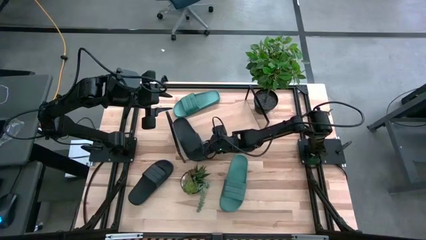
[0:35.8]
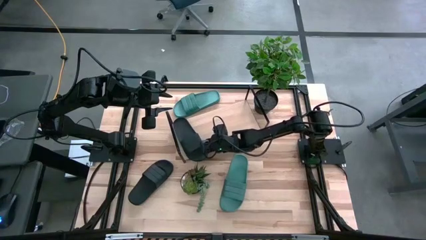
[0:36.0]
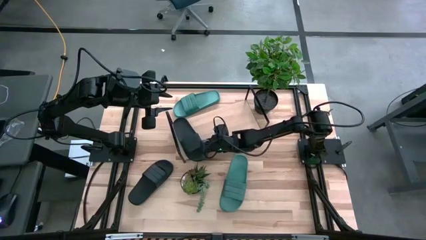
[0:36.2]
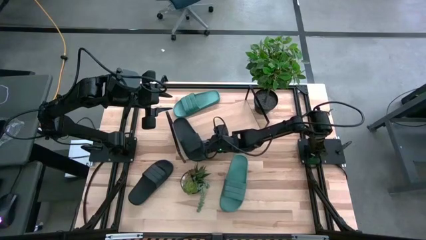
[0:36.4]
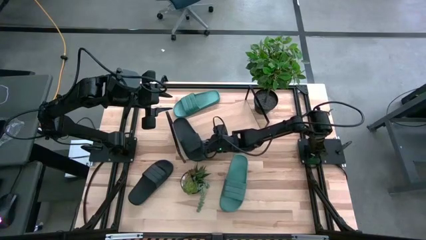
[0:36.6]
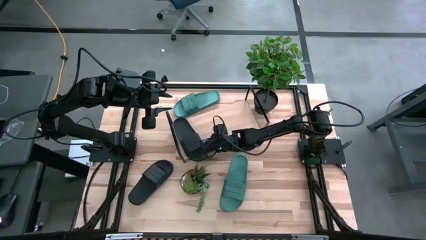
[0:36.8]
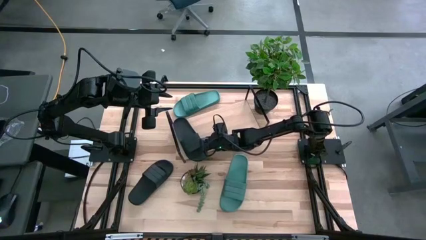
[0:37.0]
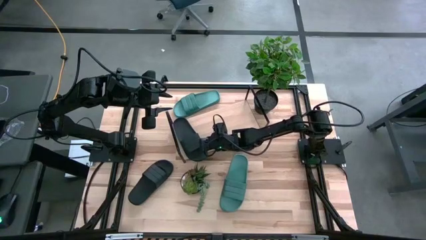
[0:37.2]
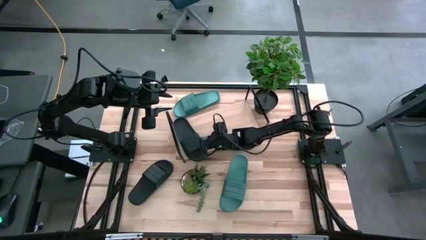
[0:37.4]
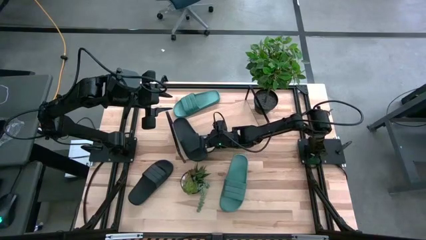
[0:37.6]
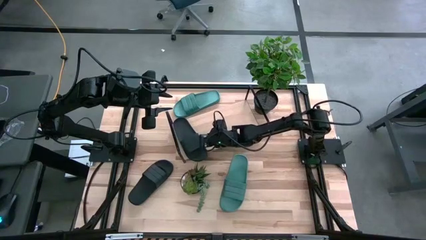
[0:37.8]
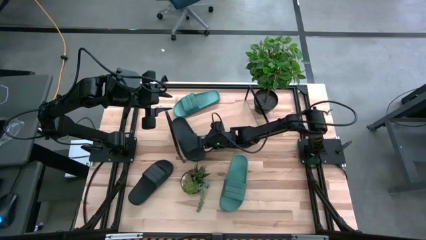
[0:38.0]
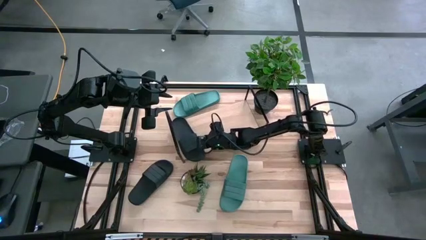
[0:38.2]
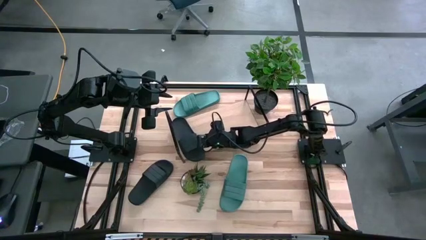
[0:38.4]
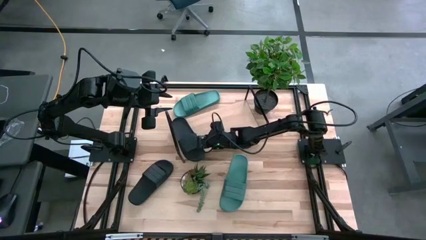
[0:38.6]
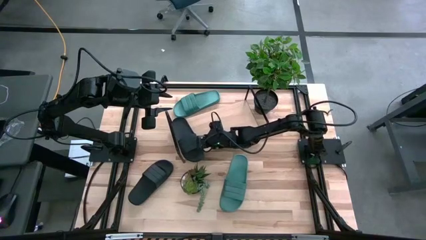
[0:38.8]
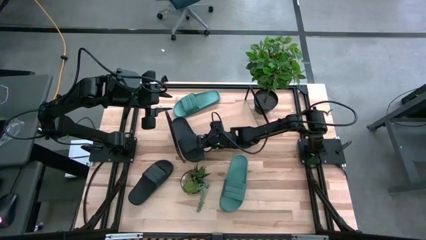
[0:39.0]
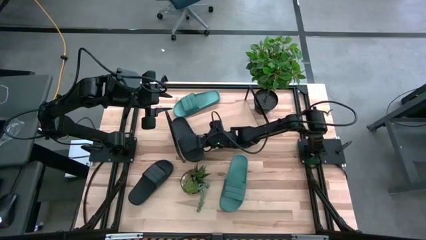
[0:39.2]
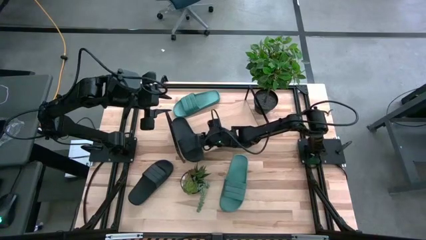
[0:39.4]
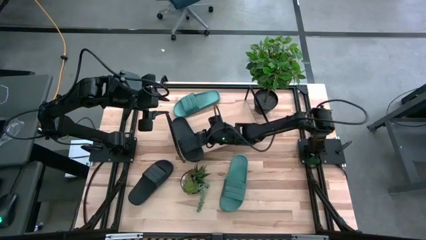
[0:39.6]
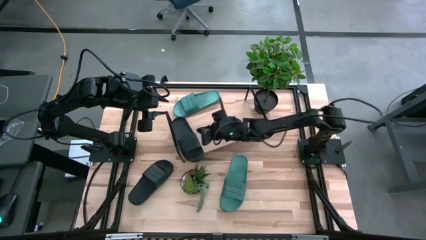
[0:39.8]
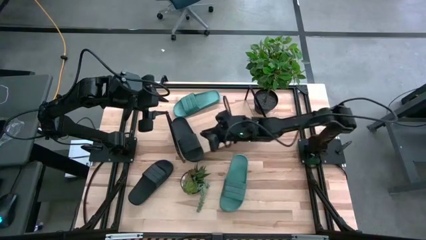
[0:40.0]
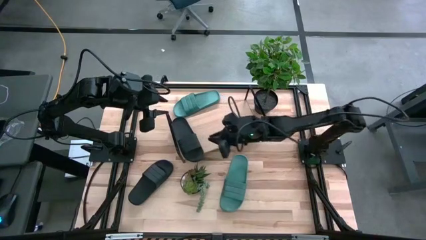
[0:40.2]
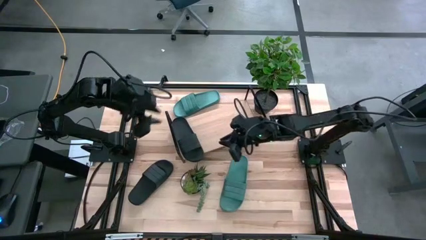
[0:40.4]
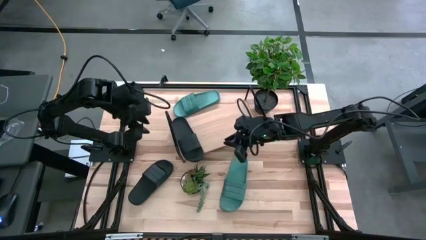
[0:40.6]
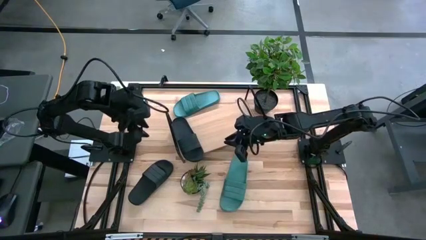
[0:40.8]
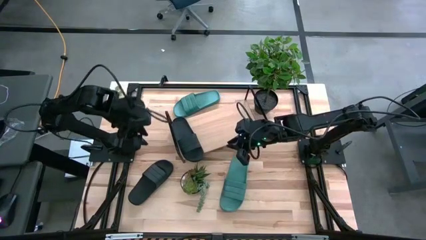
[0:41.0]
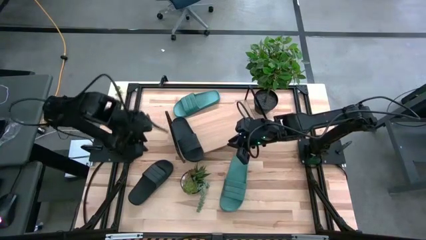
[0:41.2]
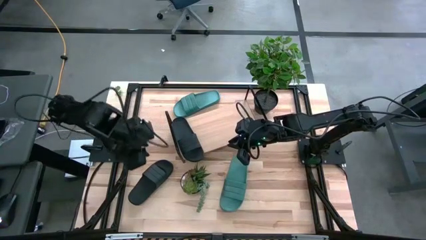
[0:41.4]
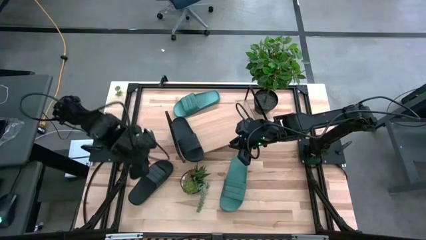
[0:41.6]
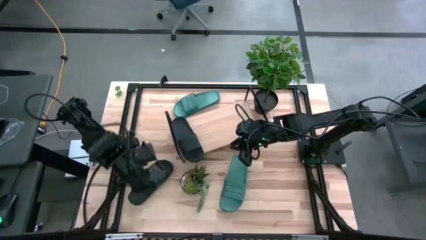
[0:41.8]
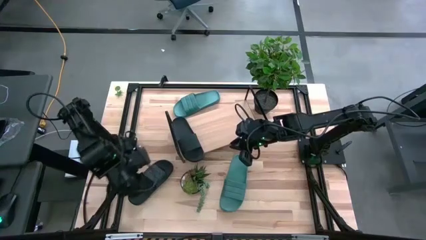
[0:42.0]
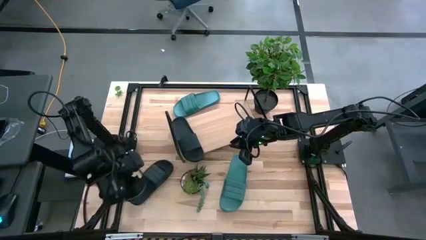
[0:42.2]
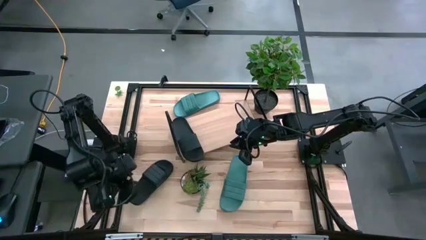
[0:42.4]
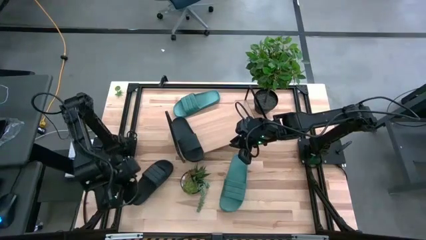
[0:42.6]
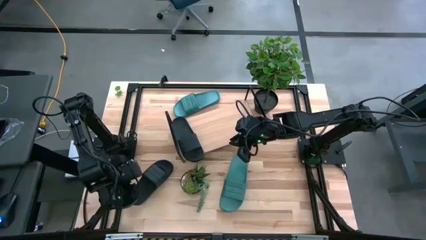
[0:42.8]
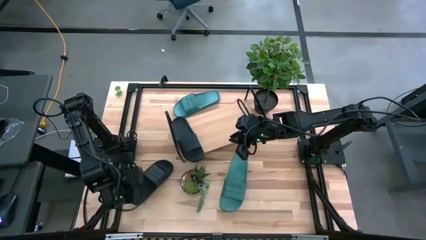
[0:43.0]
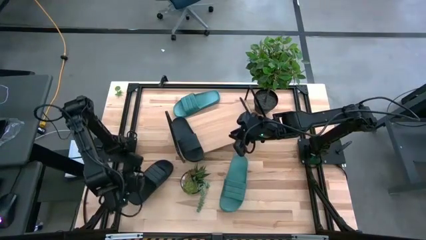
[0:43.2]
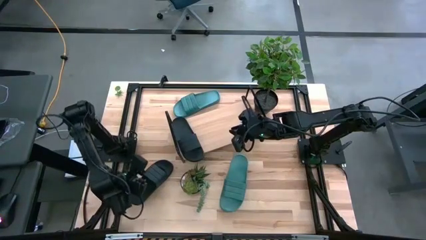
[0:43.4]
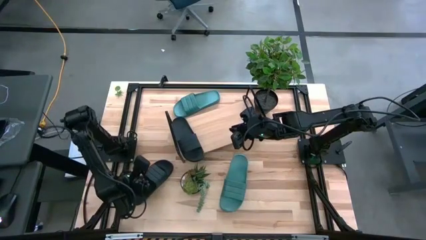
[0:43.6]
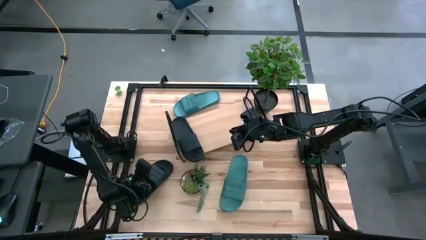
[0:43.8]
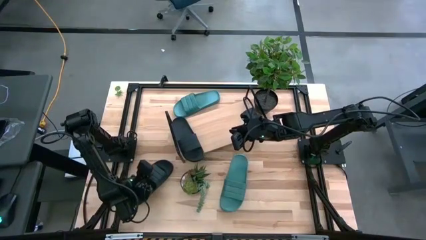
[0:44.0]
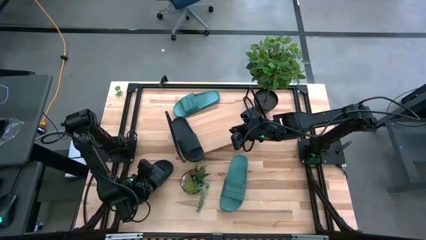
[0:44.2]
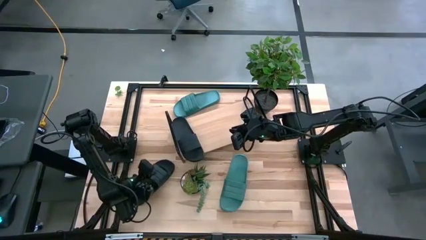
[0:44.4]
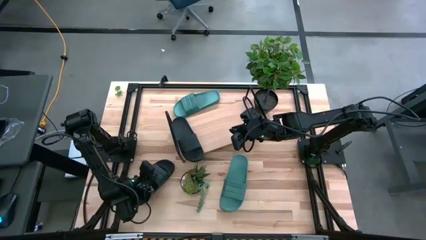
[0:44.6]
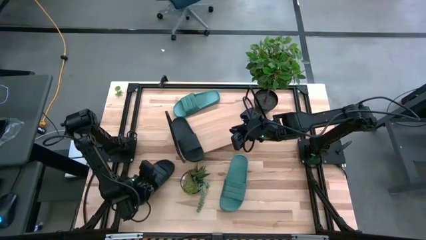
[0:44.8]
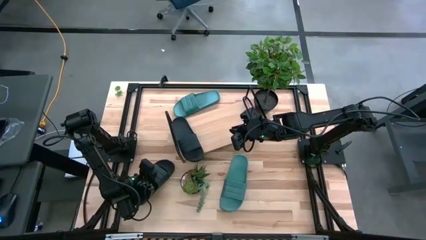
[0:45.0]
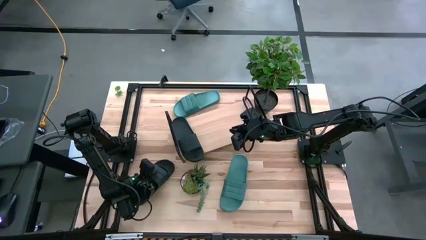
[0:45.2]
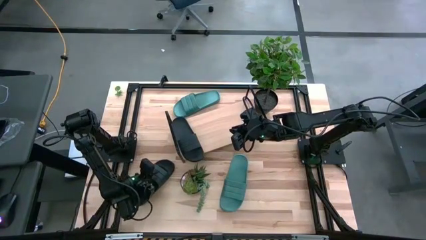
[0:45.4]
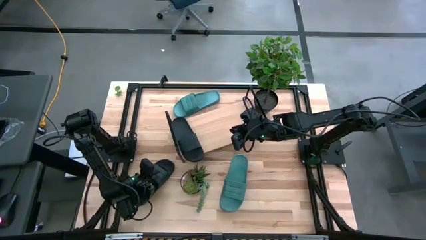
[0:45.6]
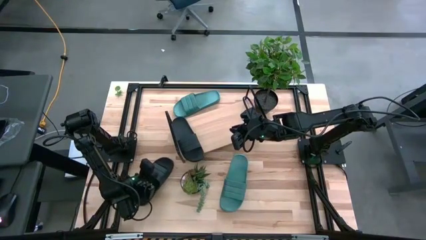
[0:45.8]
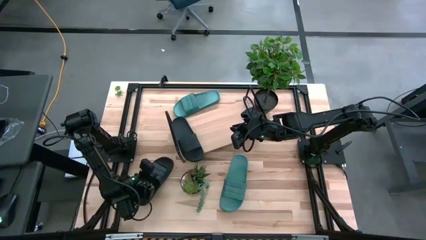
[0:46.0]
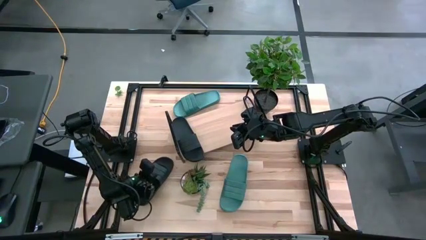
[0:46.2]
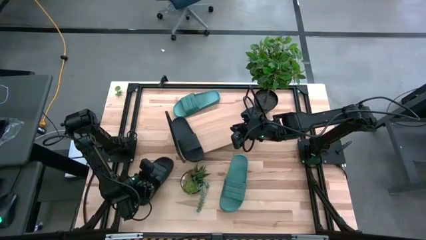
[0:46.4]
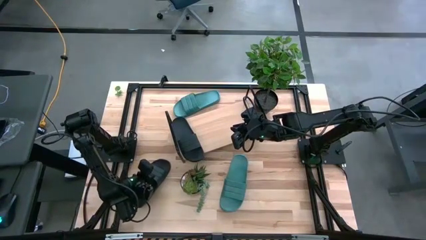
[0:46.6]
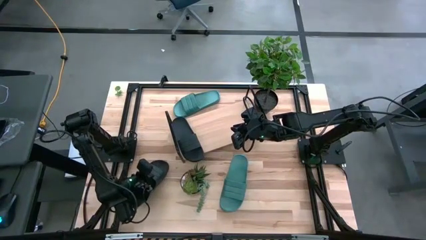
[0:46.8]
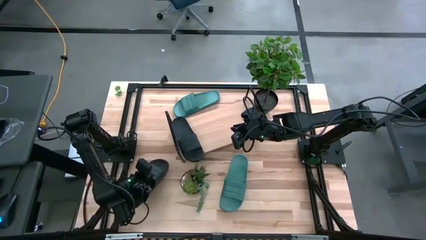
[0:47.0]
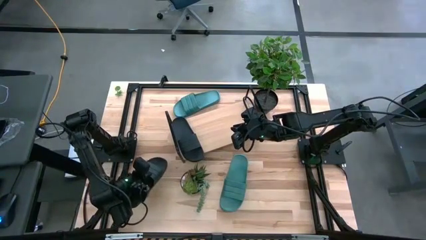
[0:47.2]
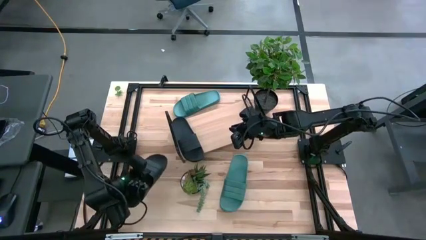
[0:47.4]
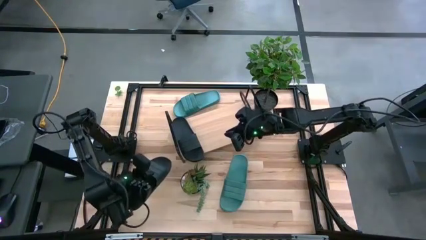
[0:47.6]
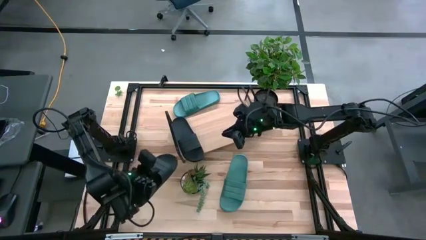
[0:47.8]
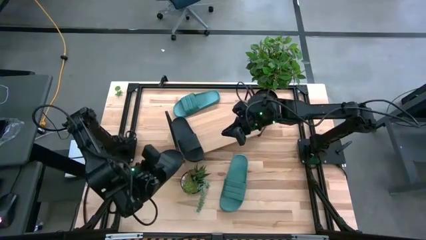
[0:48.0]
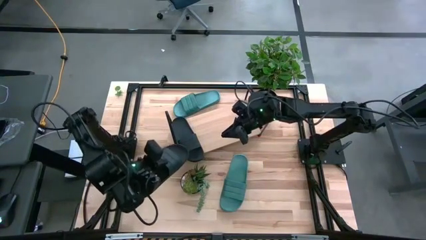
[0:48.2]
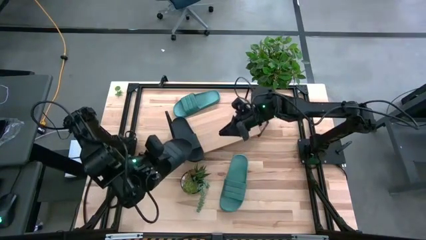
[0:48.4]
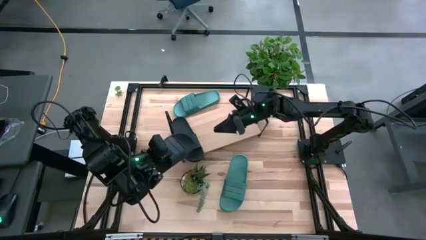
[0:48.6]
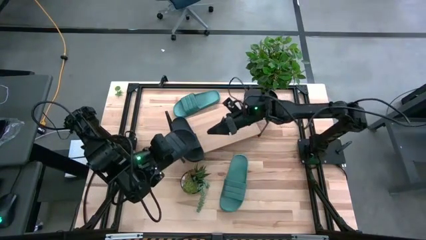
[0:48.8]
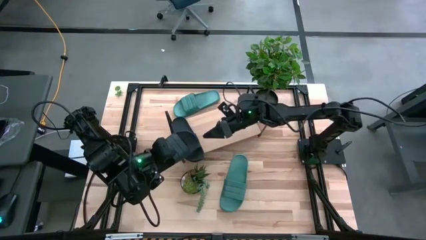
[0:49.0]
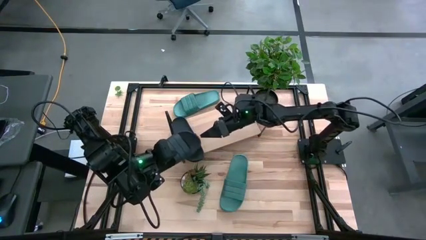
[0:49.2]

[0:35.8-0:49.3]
Task: Pick and place slides into the shelf
Put the black slipper on the shelf

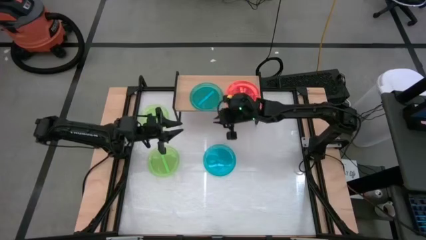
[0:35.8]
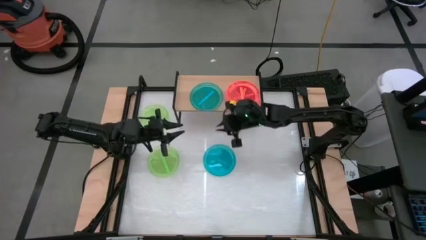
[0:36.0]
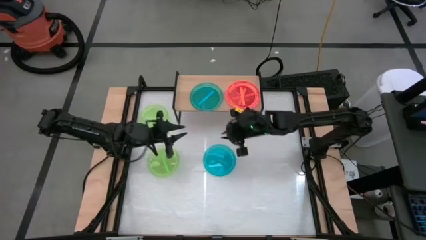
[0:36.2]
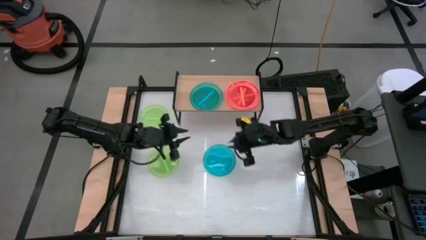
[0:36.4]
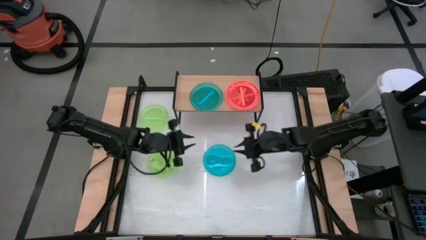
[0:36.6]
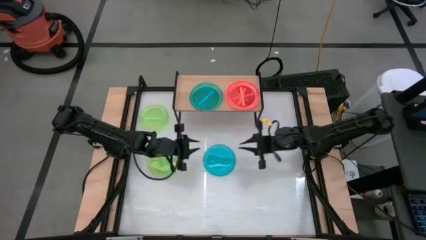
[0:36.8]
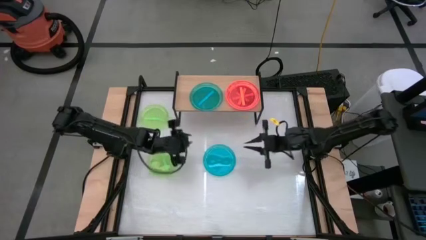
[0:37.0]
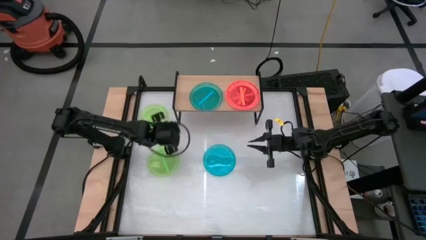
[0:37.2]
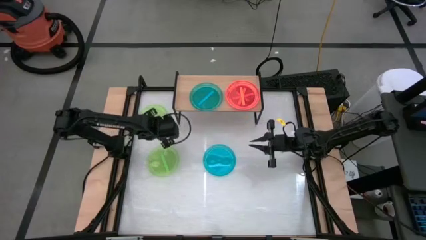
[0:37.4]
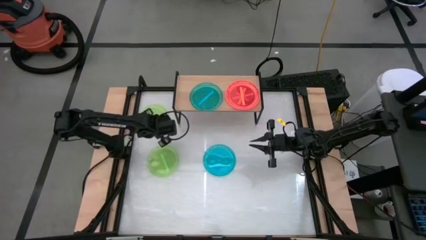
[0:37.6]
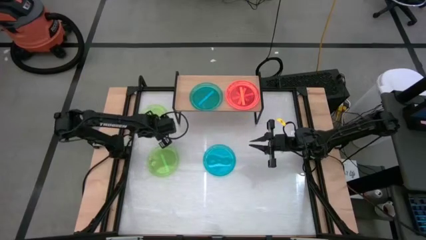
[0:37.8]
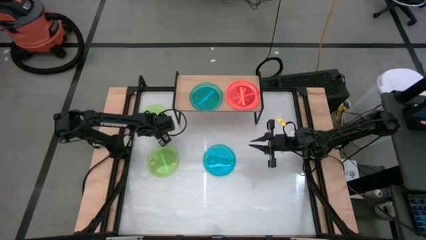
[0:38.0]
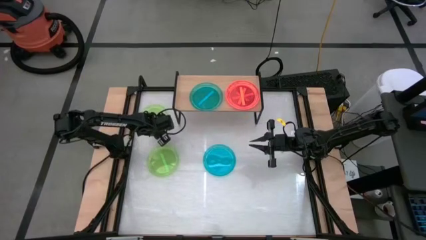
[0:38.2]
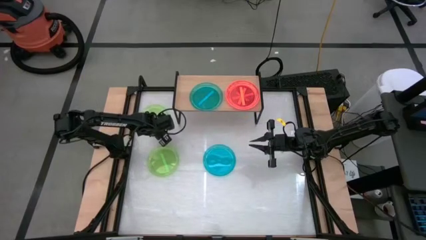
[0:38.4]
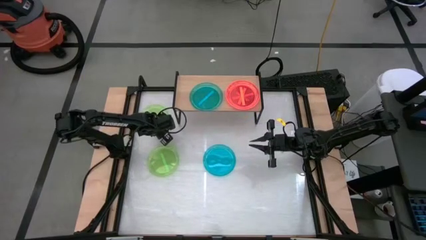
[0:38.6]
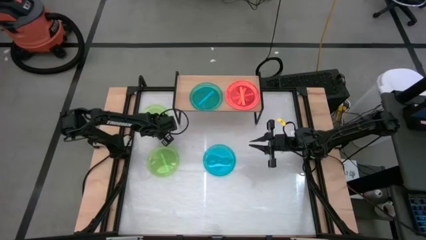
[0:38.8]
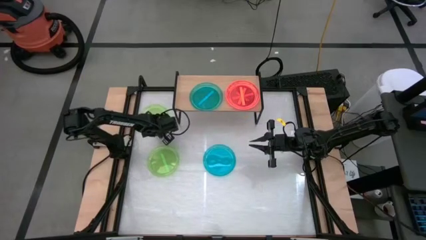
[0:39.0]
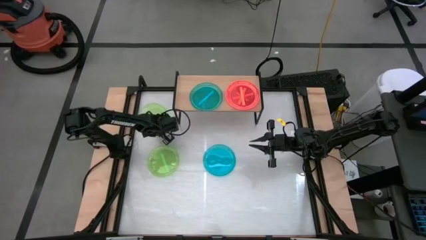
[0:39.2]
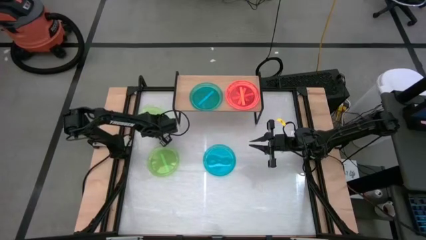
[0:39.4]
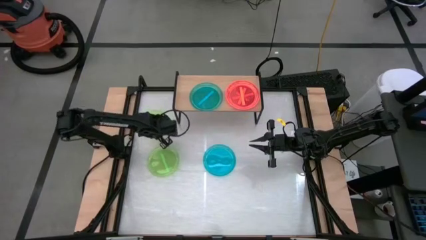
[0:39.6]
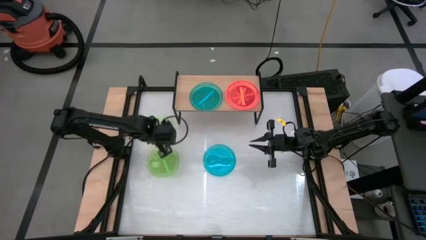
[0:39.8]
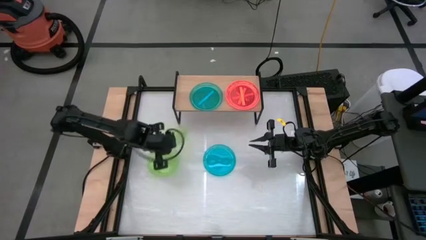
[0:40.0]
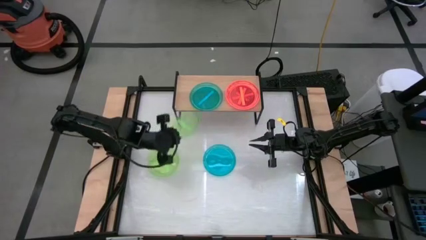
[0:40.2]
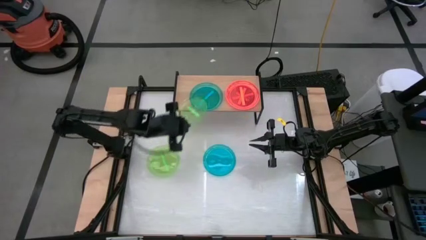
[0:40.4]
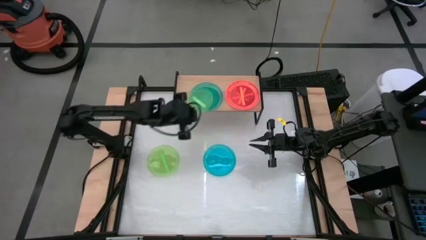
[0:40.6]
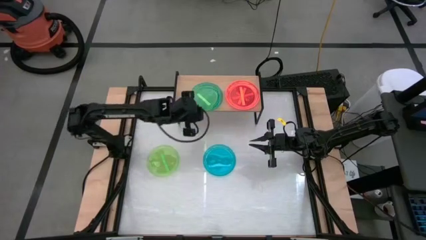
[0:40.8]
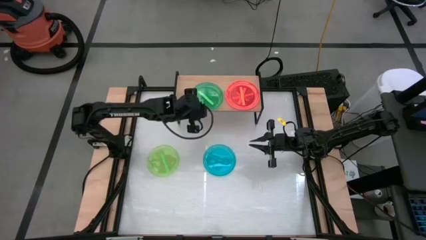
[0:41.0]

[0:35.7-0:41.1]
Task: Place and stack plates onto a shelf
Stack the top green plate on top of the blue plate on the shelf
